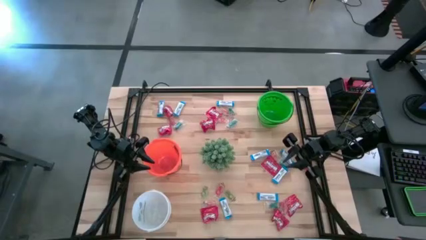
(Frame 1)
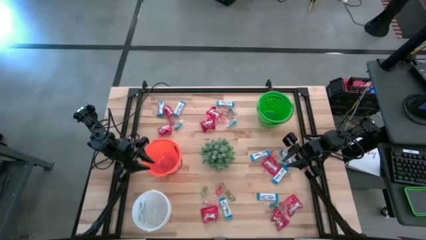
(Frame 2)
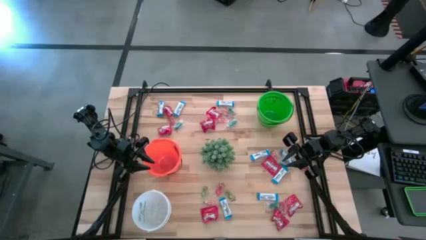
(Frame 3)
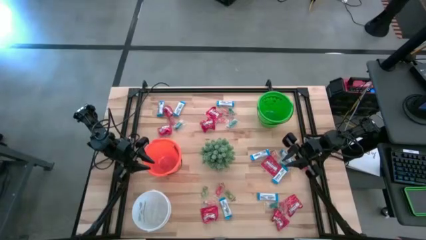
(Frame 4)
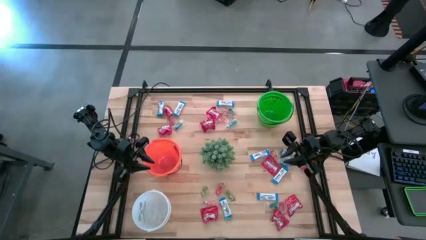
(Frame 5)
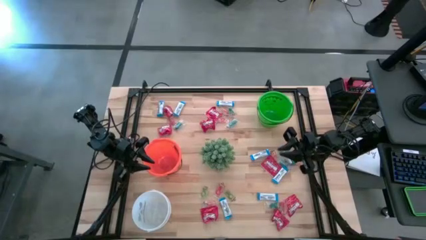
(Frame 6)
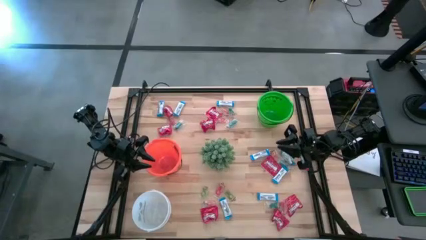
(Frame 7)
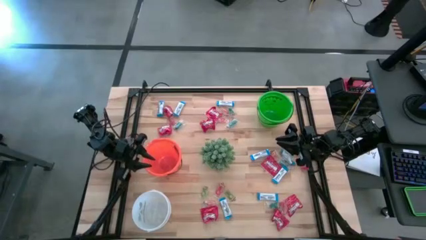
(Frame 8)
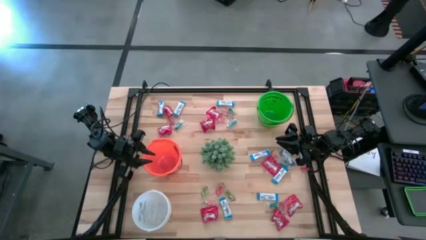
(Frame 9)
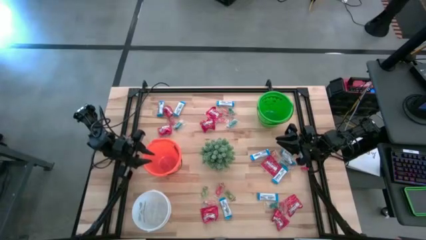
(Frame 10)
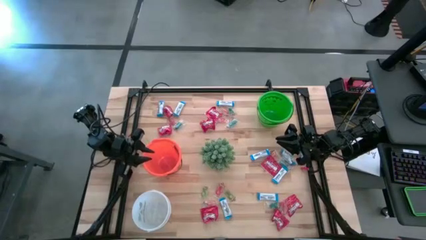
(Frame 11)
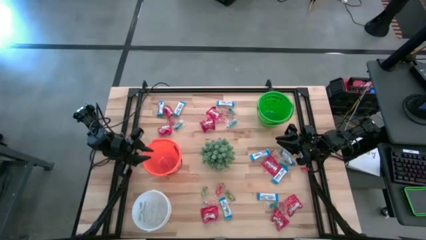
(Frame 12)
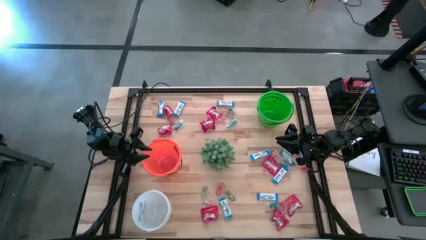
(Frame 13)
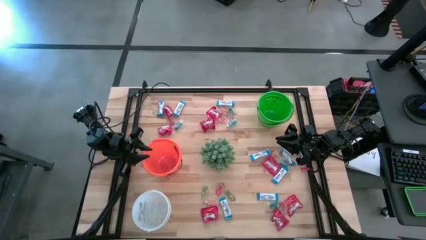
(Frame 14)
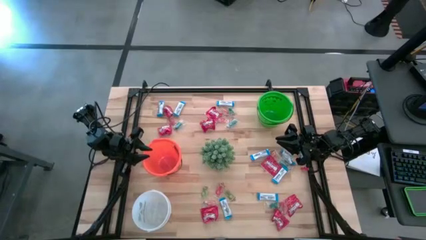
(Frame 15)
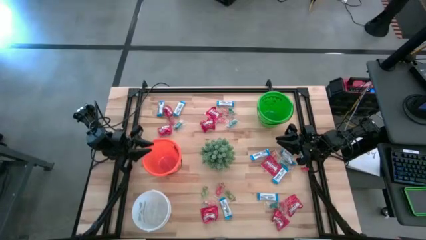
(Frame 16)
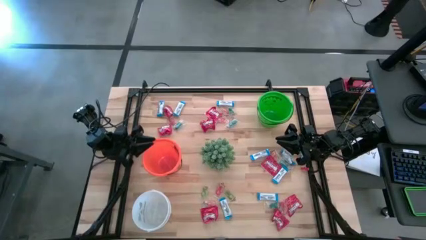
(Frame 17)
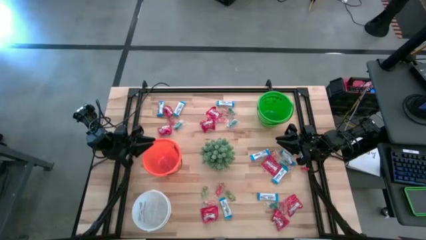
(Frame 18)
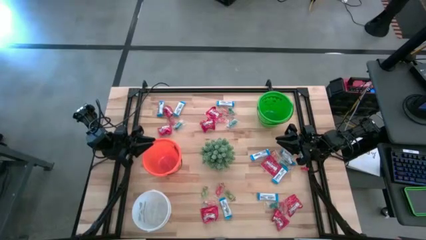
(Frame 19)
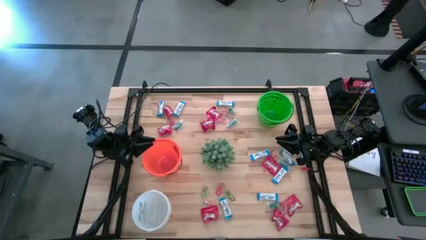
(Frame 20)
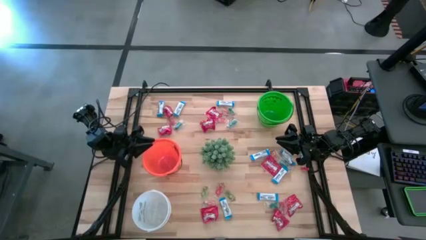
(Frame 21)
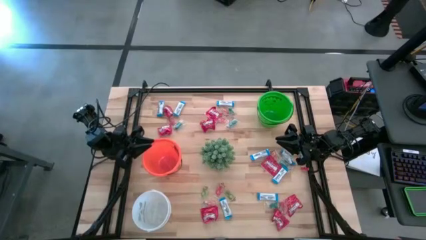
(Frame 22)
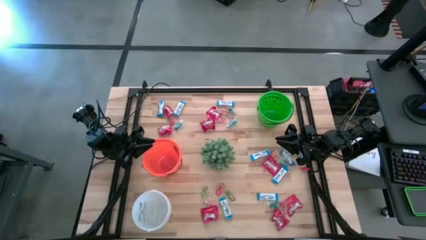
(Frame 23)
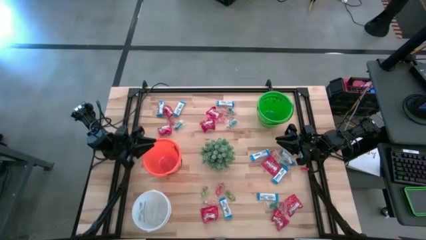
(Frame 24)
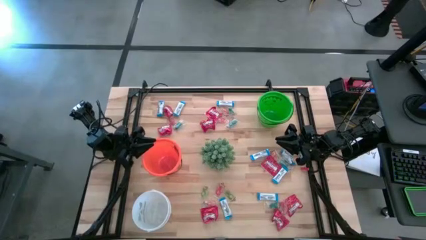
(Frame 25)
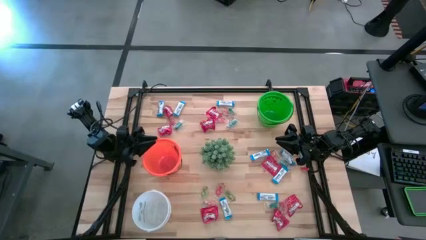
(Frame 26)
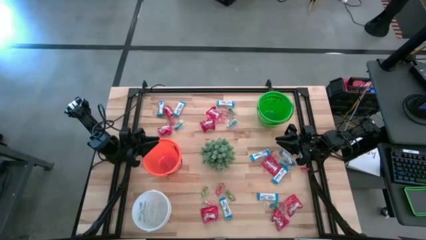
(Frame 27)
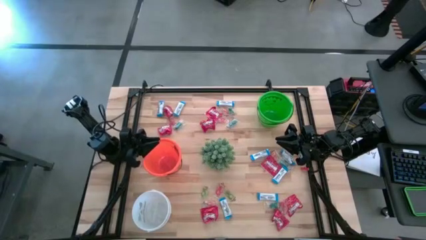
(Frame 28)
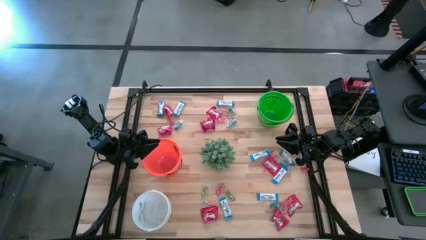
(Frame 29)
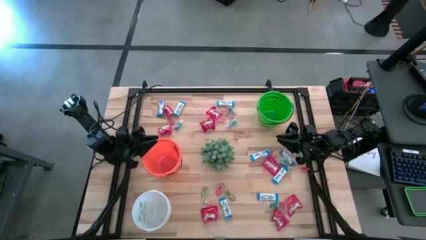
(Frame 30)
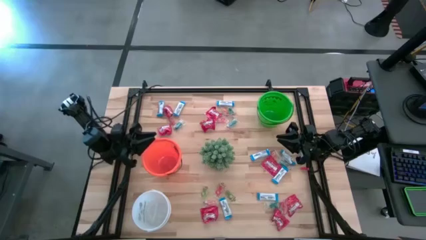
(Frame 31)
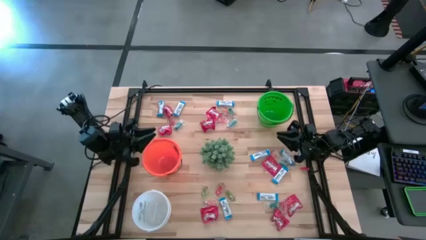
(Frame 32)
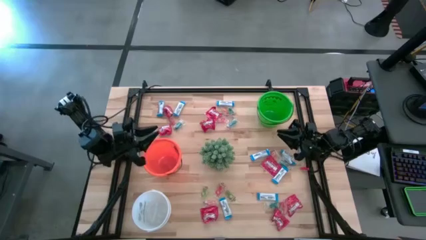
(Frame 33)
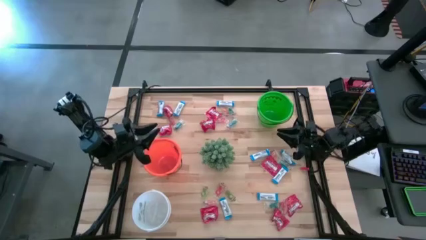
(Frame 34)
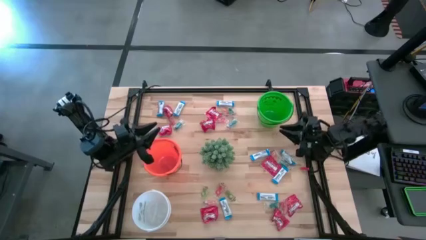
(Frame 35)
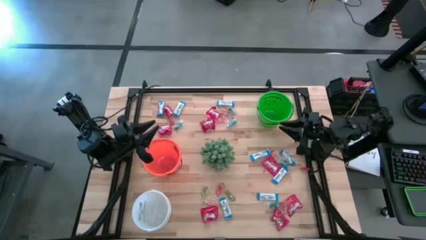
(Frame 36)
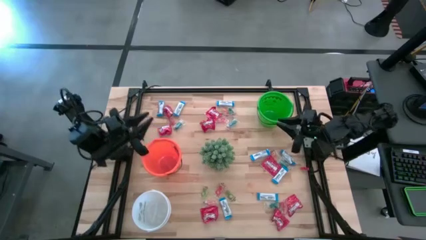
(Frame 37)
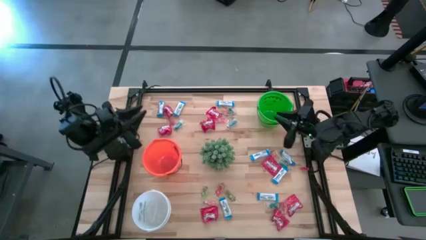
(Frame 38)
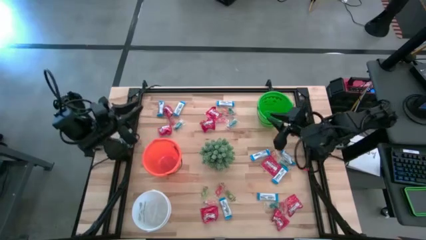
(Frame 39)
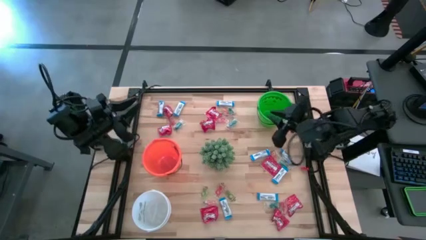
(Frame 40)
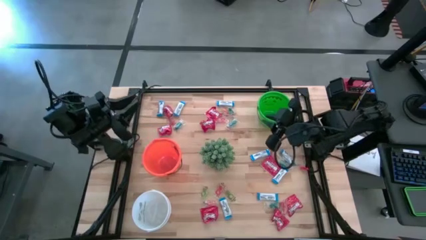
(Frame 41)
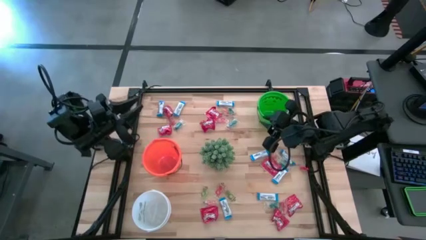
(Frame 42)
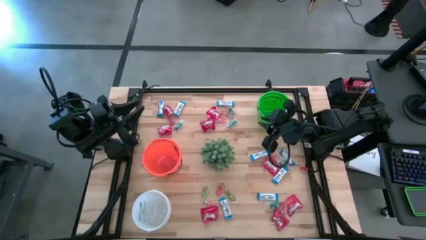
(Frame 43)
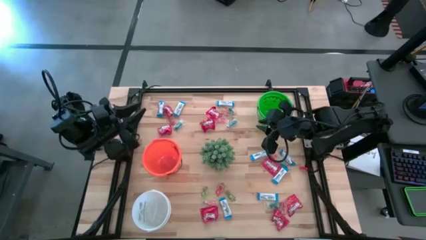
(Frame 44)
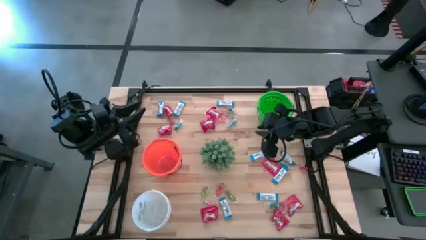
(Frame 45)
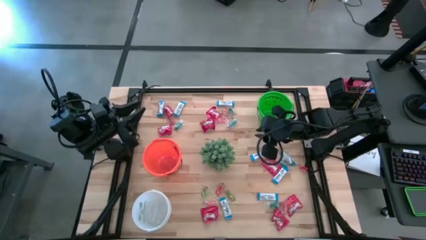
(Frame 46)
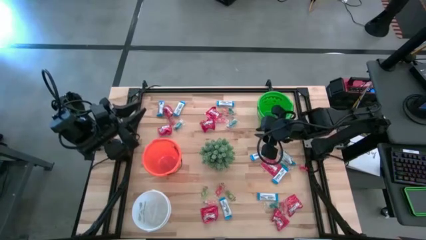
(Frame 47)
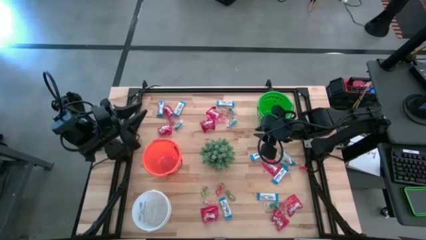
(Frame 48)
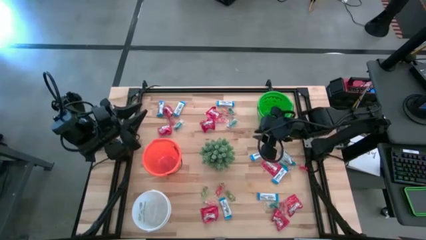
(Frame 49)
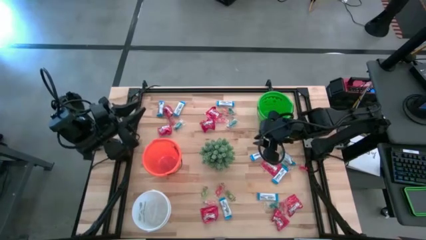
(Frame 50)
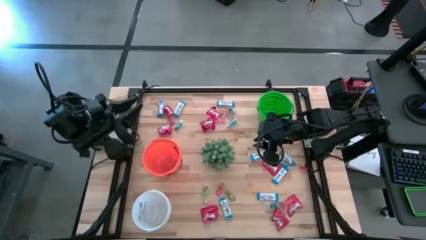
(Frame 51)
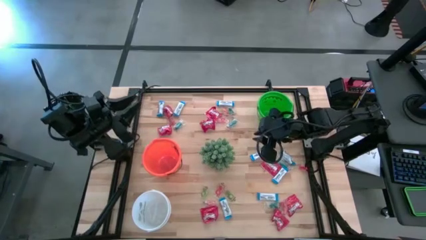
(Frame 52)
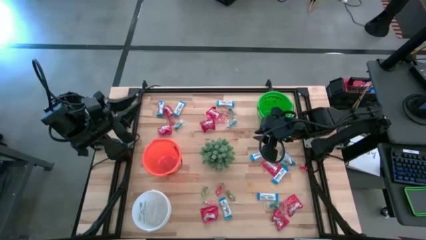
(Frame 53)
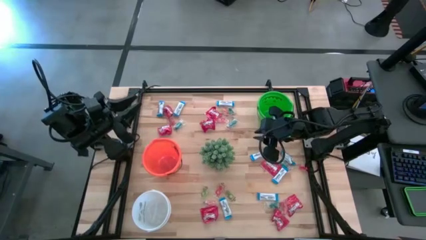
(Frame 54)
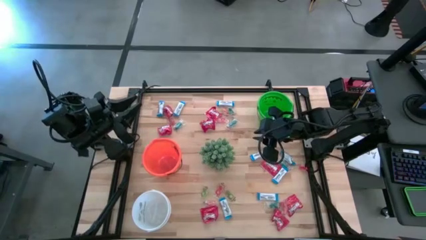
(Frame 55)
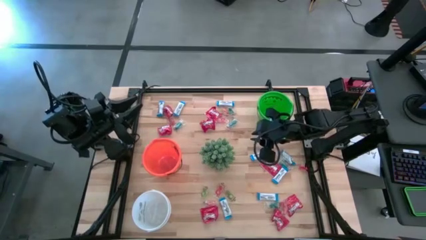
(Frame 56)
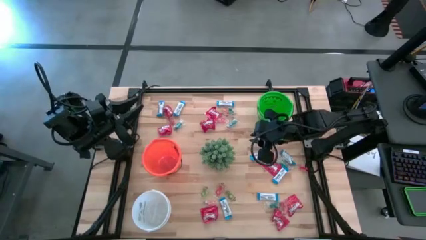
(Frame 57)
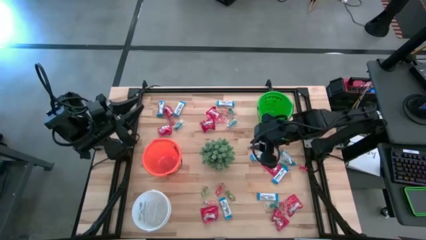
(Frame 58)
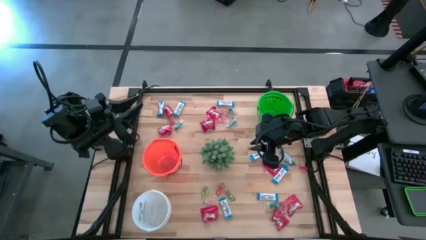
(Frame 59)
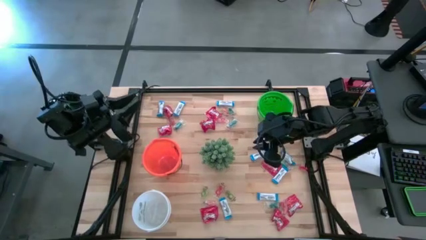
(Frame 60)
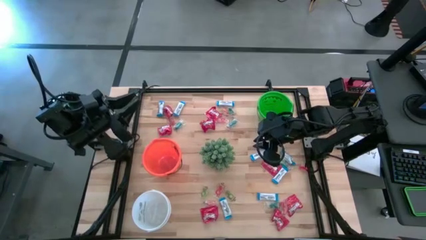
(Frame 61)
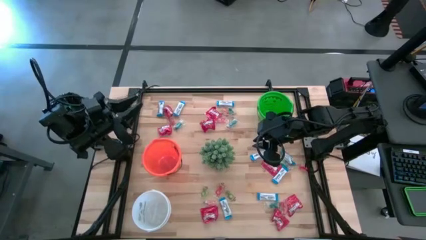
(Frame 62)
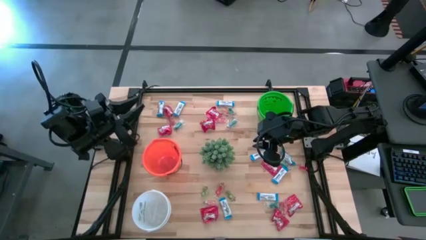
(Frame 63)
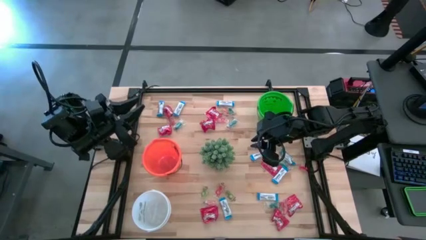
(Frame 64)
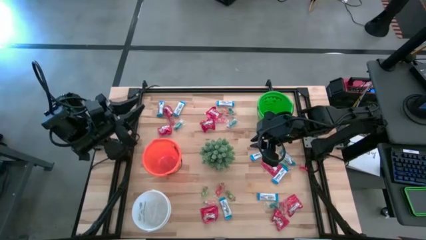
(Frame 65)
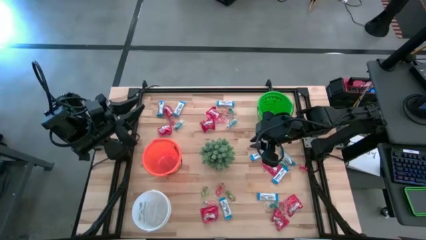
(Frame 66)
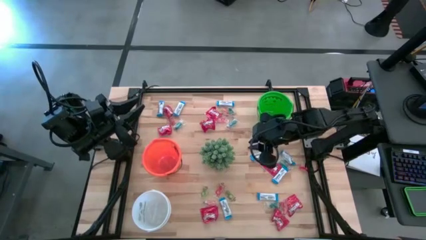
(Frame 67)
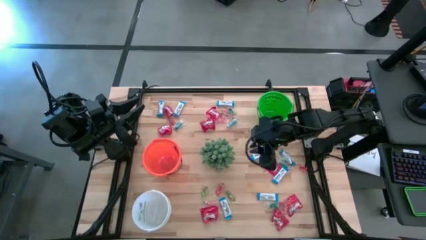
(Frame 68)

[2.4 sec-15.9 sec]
Task: Sort candy
Put the red candy into the green bucket
